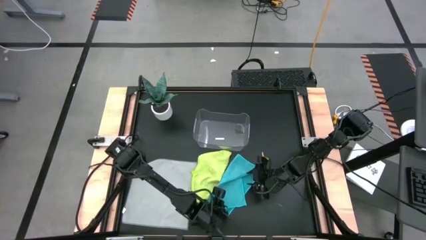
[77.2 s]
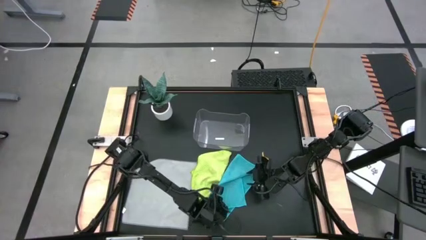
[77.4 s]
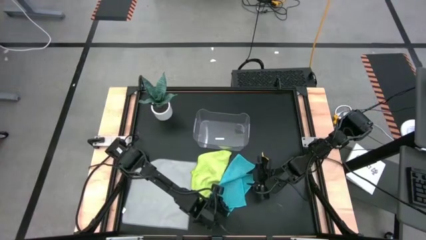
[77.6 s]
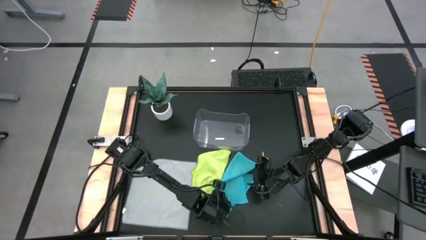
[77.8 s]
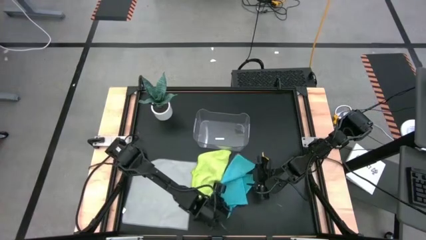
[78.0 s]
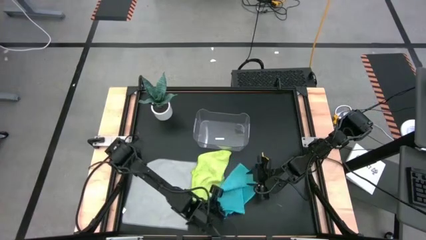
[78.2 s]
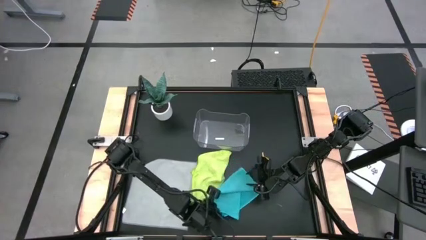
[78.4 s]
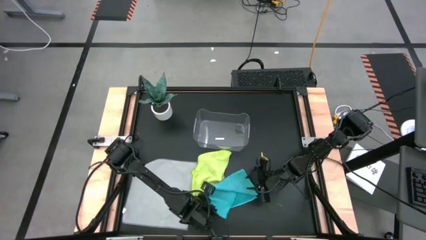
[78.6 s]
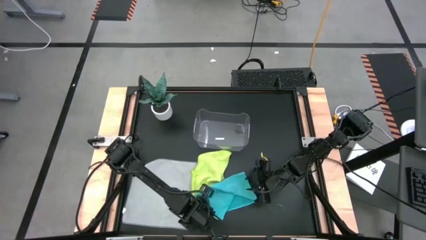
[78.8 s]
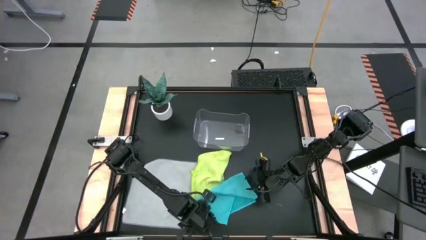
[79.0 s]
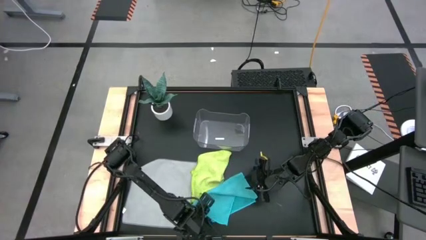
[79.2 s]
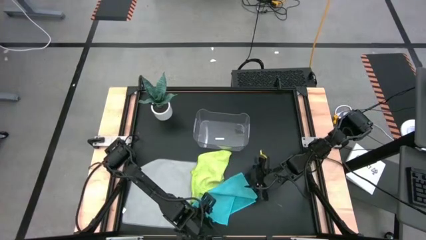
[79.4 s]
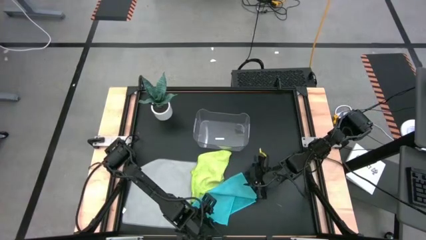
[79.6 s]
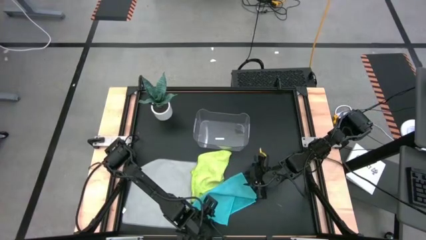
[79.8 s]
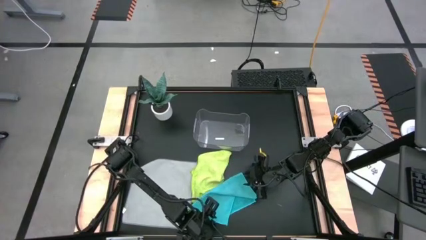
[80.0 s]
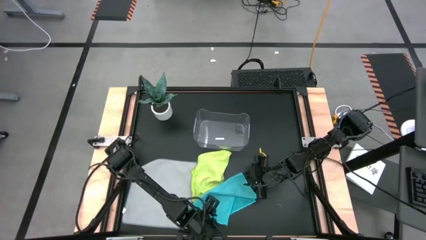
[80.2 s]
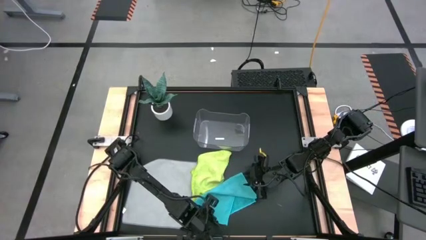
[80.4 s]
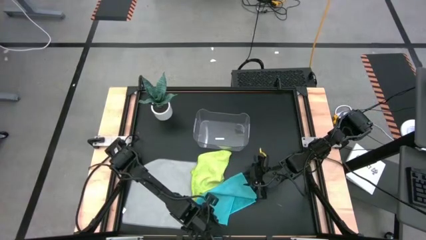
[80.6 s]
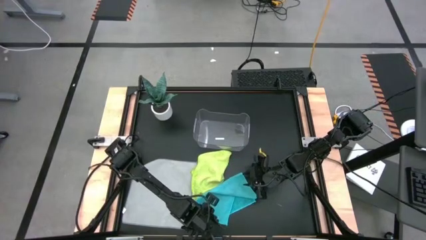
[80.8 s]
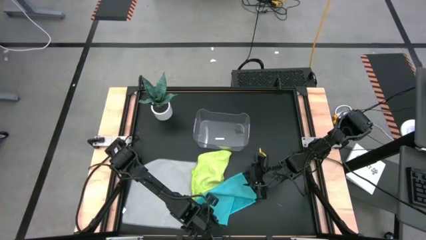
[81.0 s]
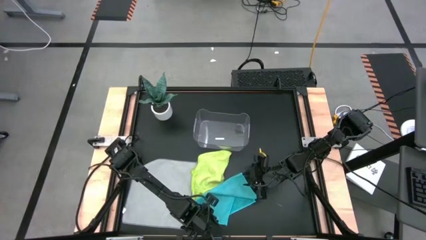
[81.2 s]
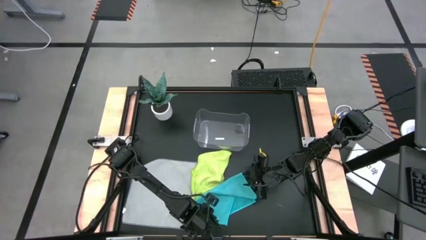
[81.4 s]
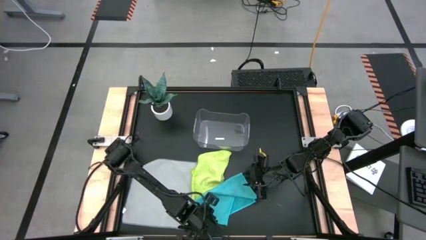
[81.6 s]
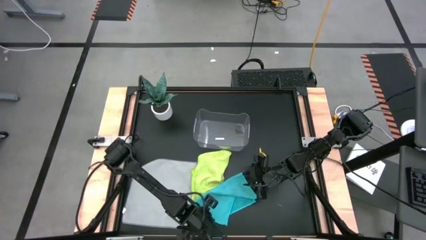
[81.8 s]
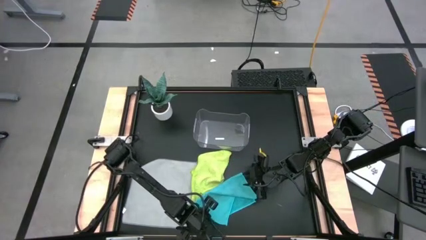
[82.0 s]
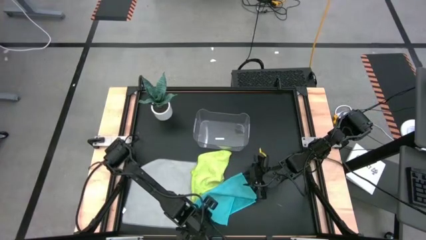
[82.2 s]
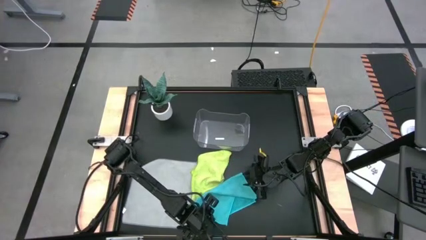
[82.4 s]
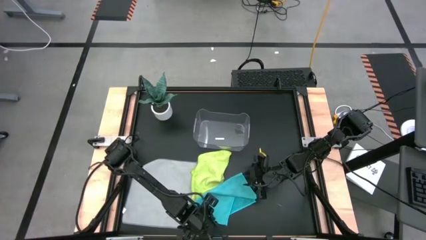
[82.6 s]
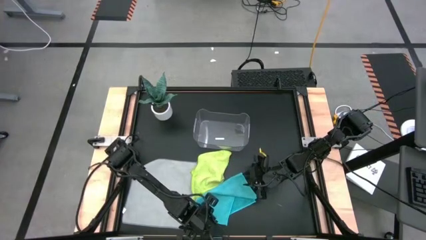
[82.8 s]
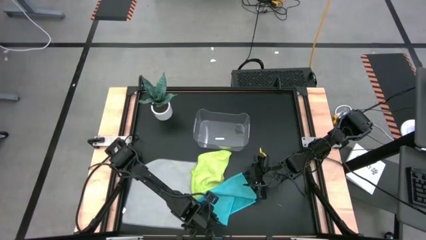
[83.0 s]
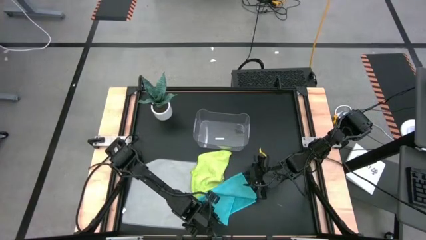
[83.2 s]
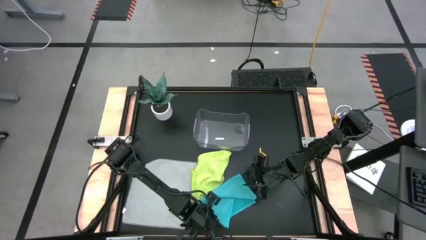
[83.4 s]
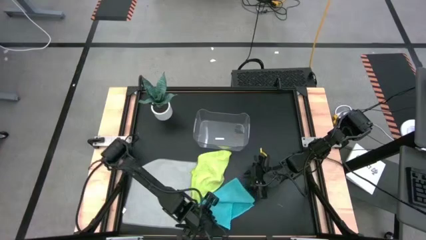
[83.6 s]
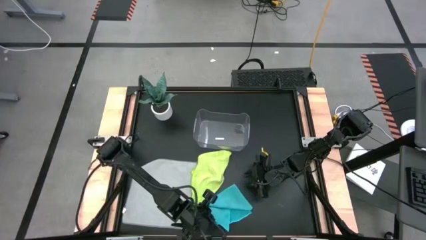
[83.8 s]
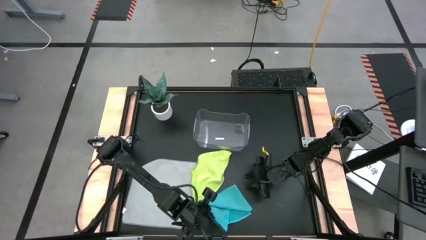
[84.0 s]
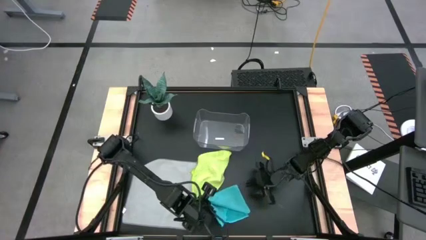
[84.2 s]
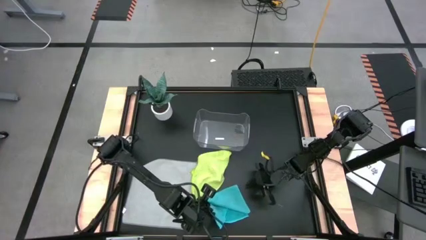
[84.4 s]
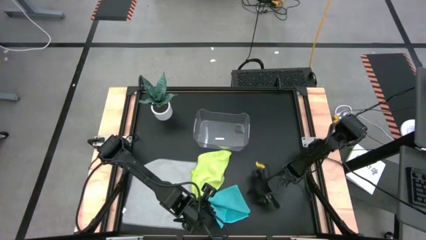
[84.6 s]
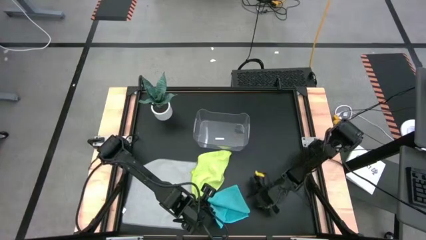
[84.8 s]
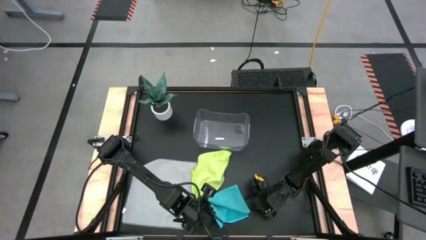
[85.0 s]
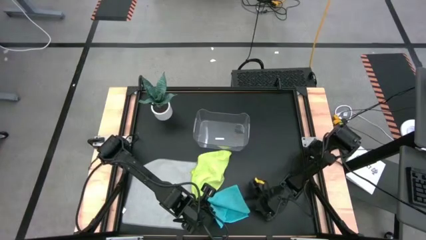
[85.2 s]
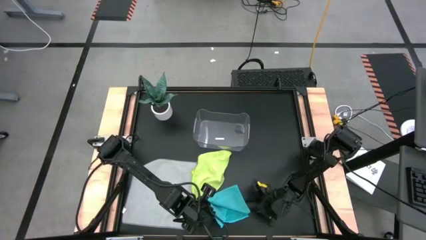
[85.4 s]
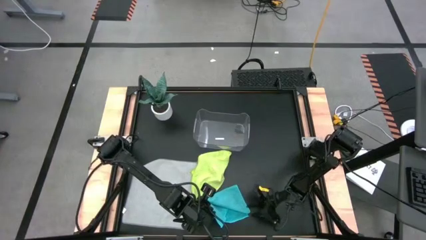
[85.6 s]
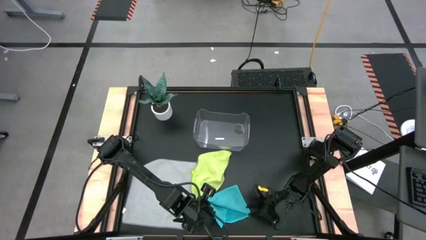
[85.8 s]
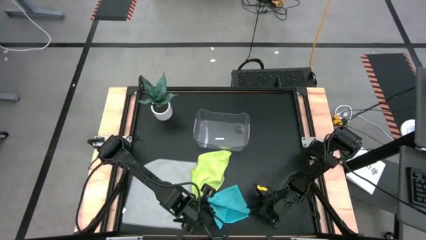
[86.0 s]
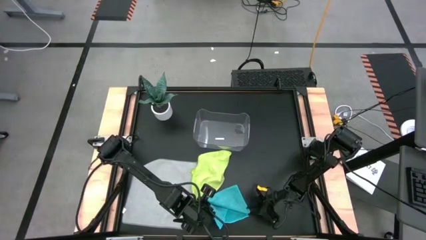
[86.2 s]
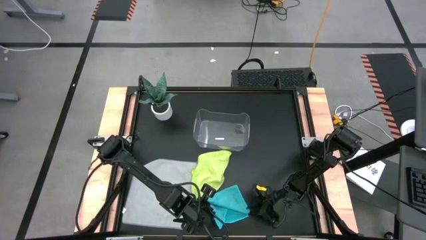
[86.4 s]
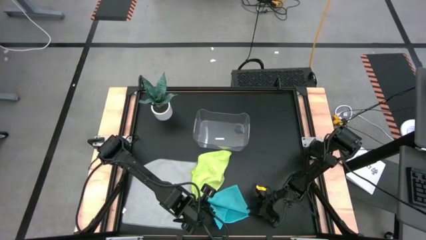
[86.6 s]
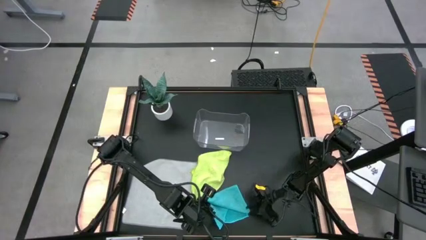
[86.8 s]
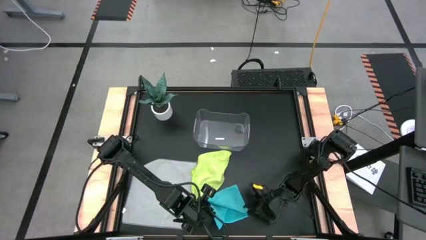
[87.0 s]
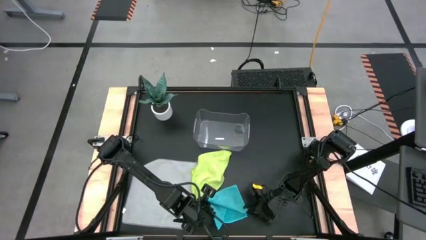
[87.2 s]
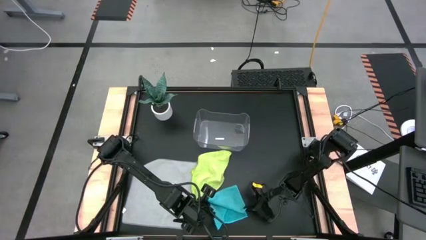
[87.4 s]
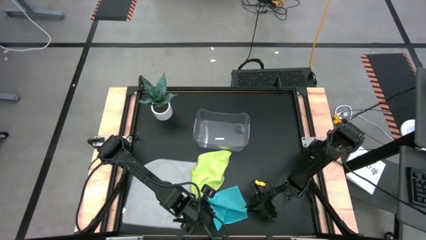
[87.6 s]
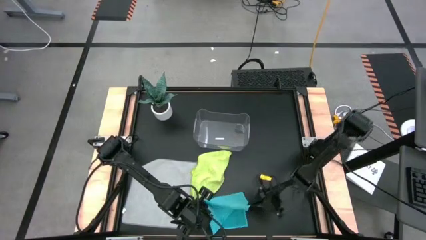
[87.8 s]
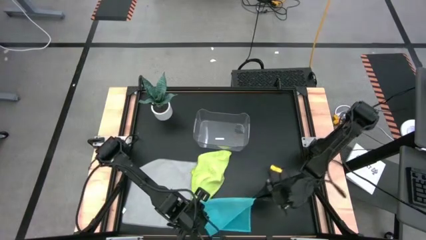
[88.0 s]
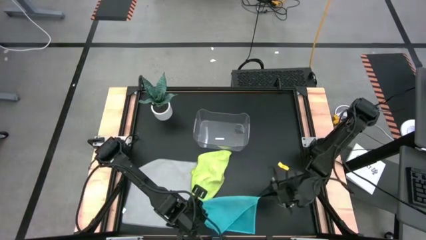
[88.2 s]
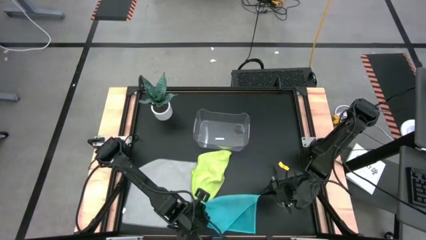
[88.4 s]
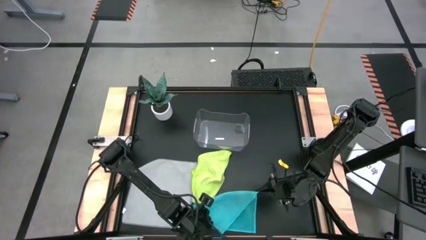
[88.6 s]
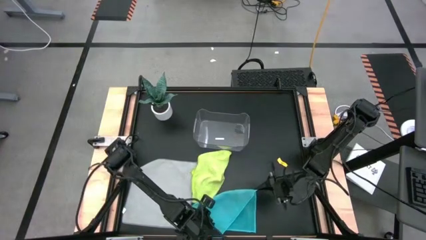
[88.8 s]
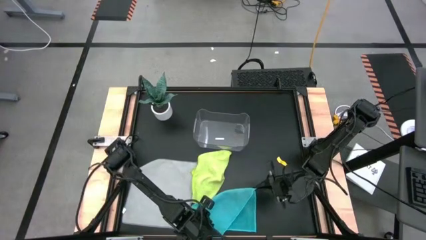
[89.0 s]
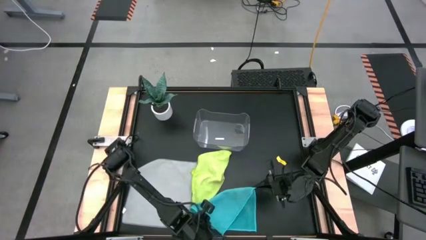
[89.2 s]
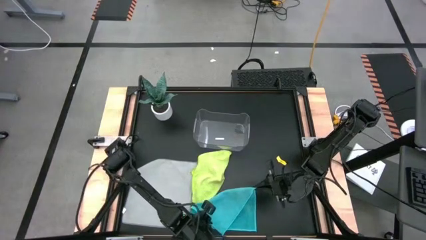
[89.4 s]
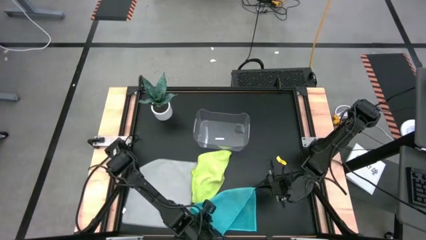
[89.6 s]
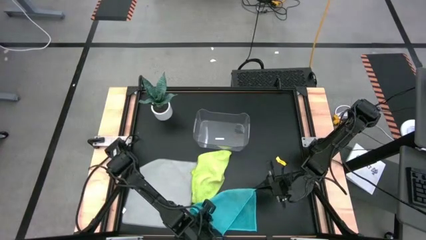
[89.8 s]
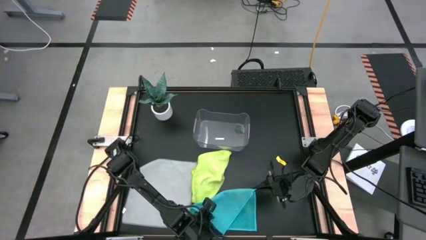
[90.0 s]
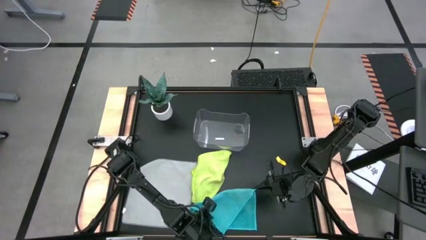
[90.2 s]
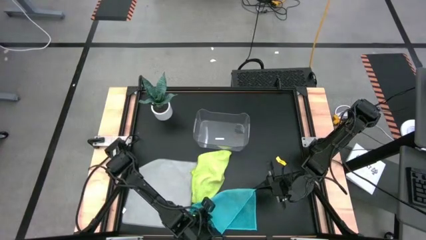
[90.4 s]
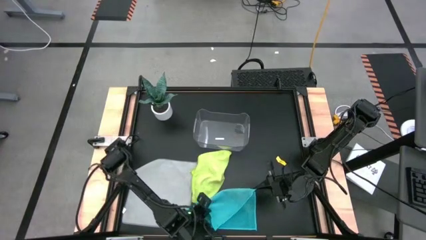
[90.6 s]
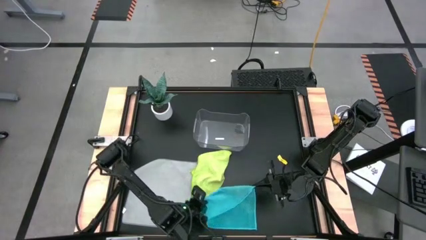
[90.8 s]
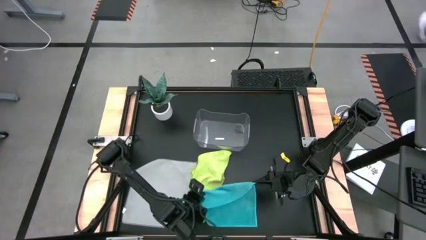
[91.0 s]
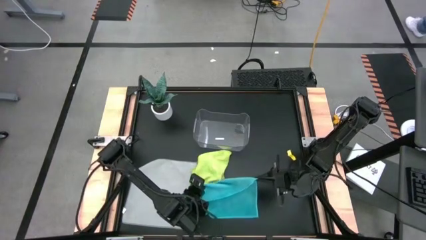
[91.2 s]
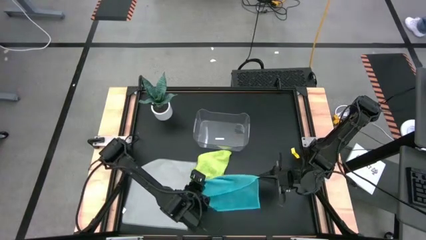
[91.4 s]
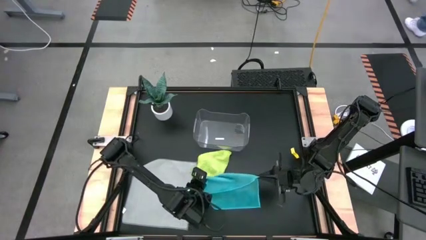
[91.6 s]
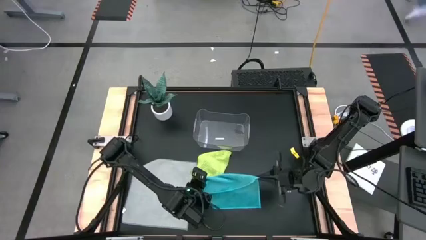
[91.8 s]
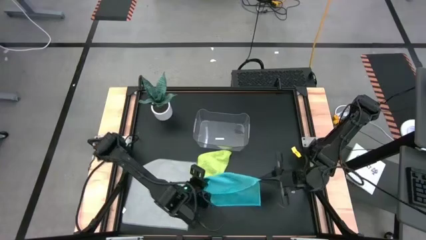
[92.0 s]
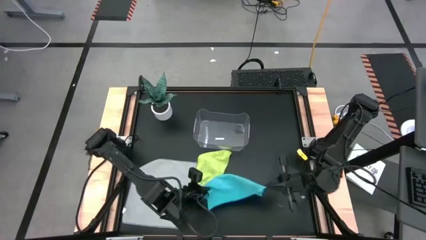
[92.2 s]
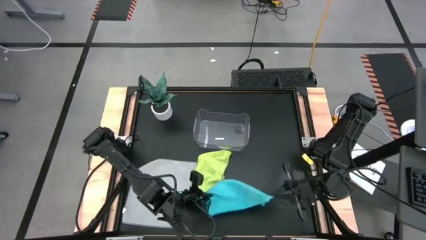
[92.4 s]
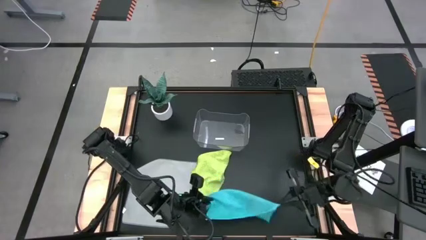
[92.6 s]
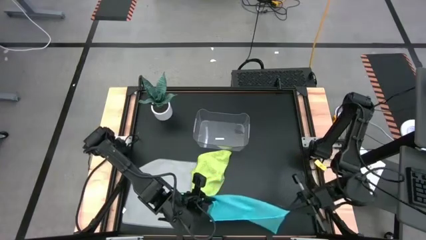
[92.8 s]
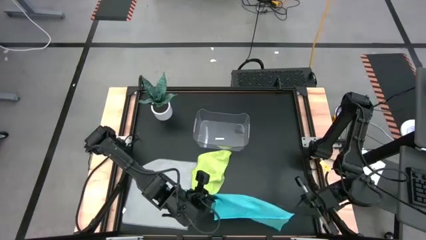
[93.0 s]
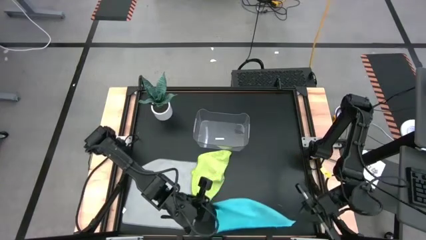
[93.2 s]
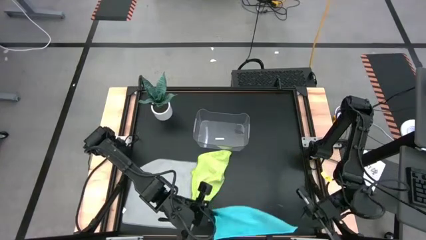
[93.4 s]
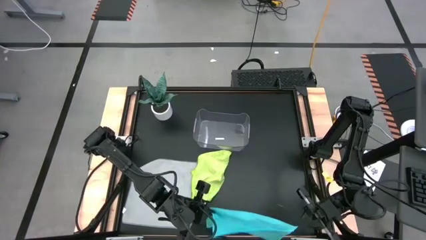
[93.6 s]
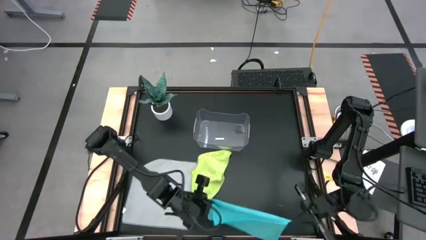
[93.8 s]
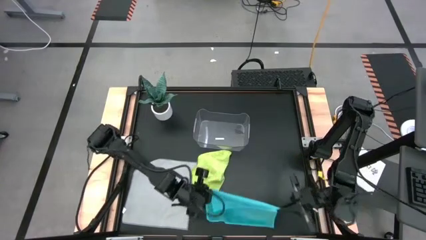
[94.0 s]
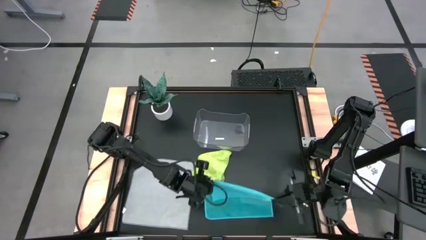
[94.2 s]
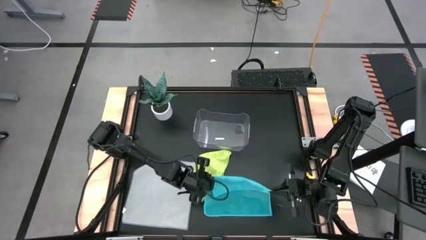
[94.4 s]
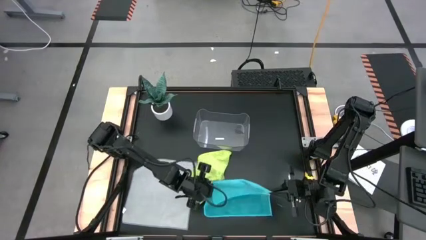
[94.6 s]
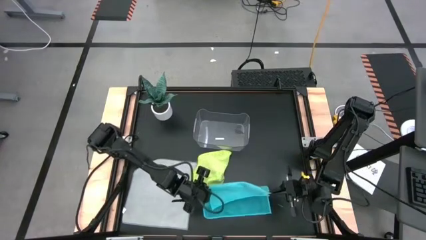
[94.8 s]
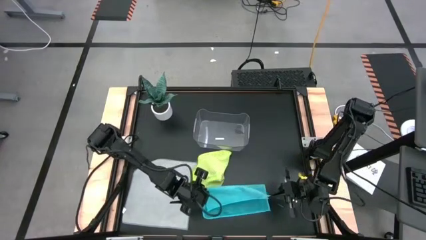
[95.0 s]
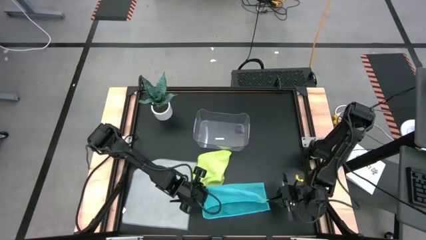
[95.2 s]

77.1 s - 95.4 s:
Task: Fold microfiber towels
Fold the blue towel
